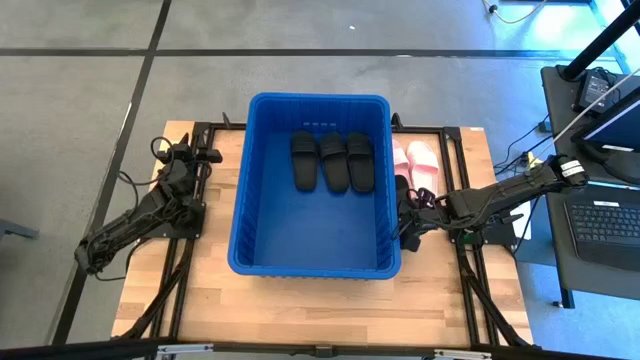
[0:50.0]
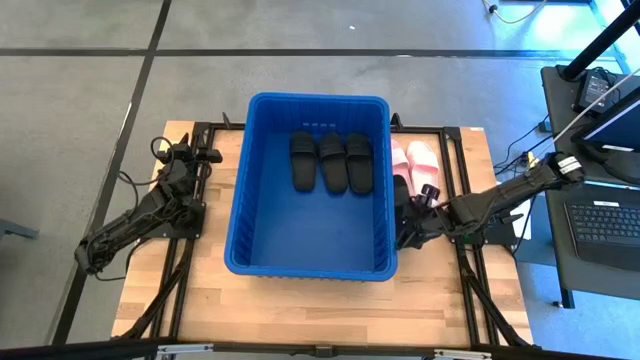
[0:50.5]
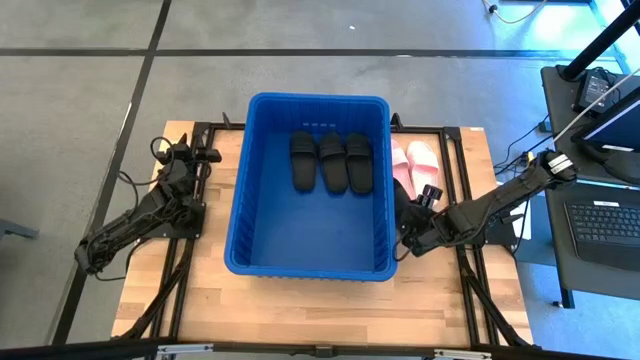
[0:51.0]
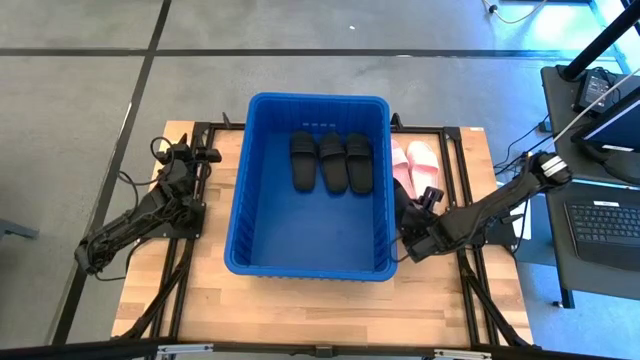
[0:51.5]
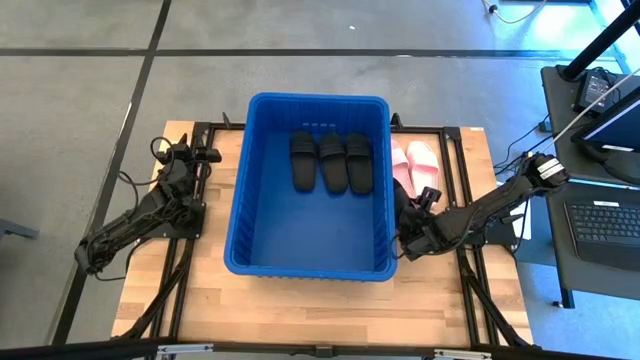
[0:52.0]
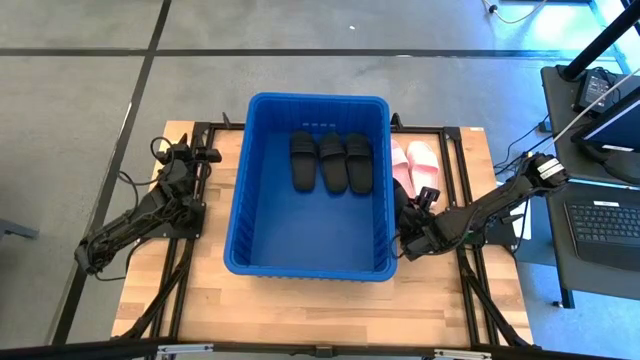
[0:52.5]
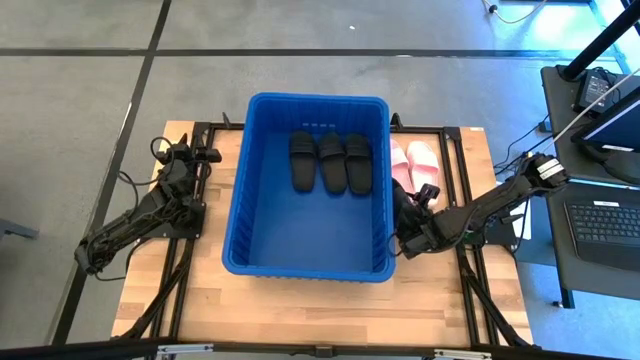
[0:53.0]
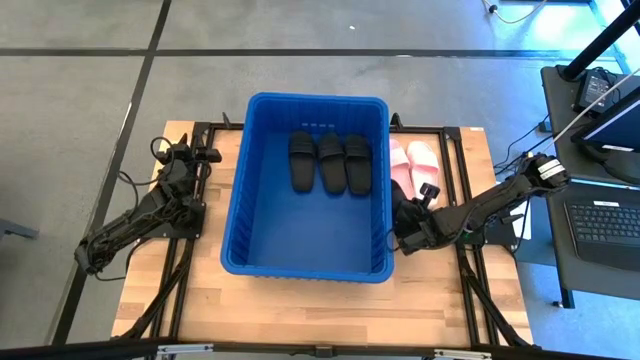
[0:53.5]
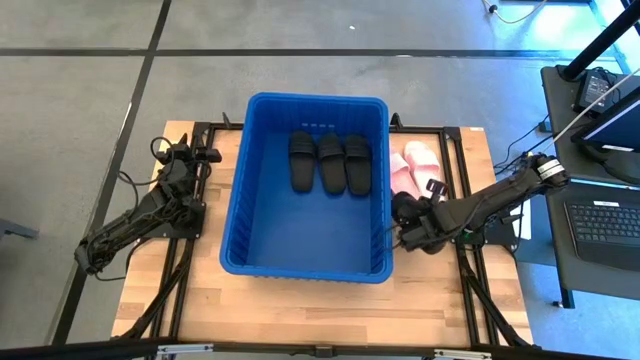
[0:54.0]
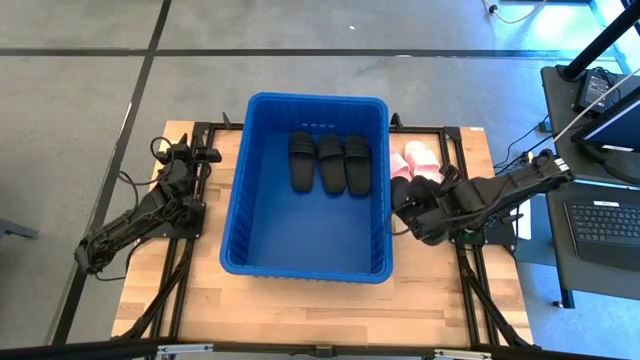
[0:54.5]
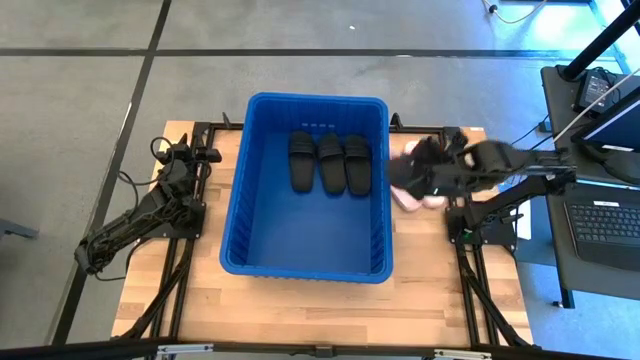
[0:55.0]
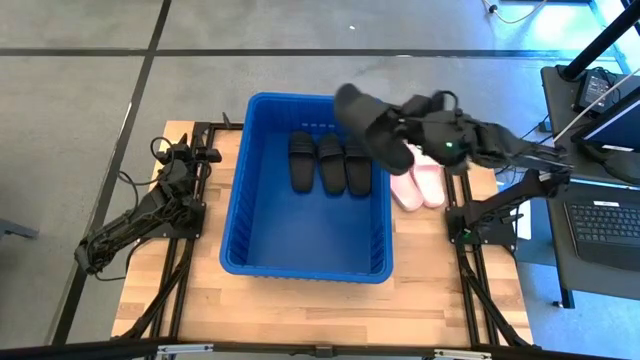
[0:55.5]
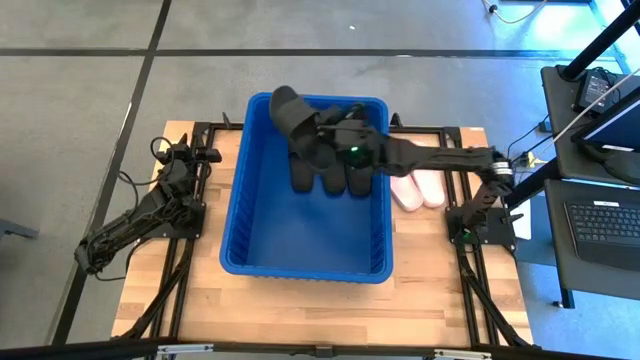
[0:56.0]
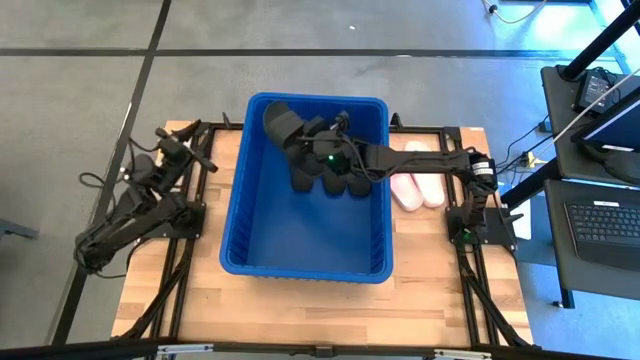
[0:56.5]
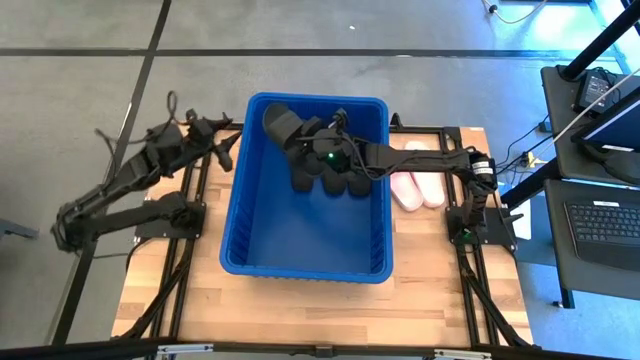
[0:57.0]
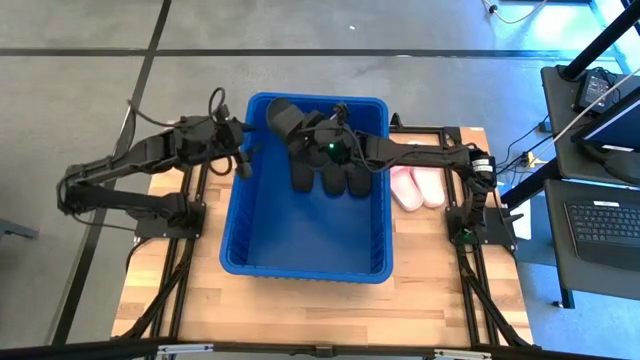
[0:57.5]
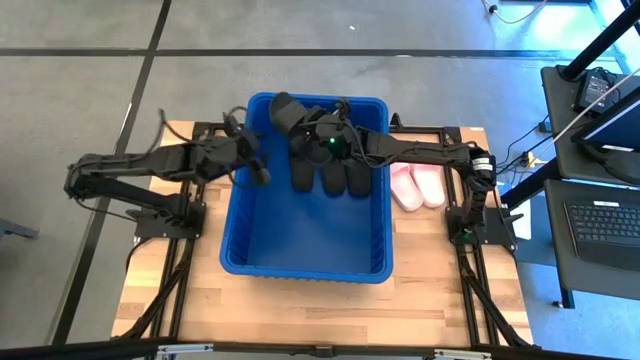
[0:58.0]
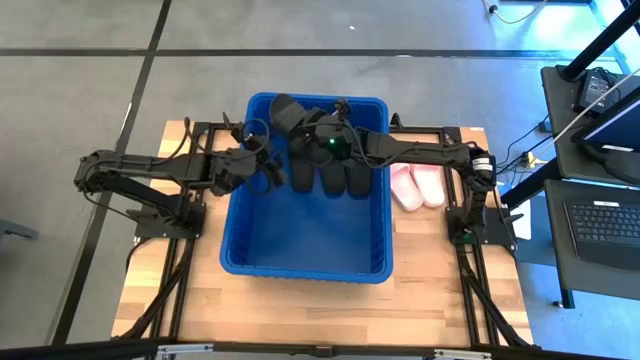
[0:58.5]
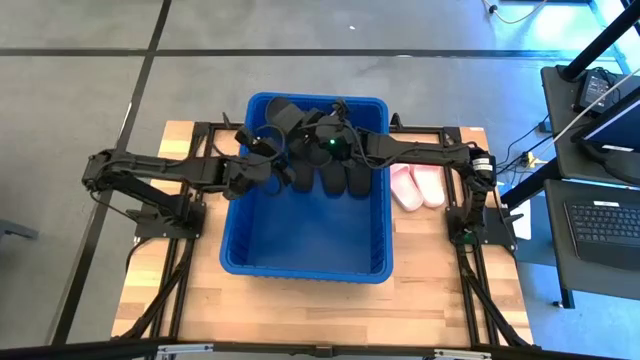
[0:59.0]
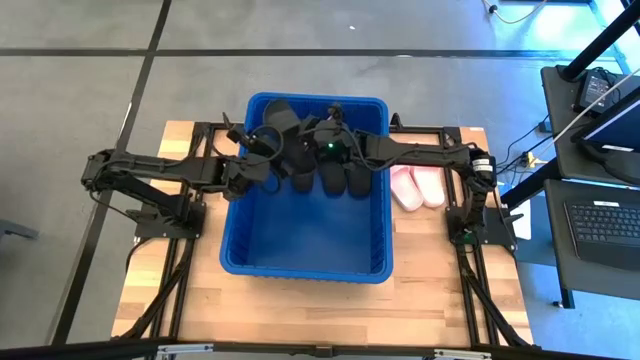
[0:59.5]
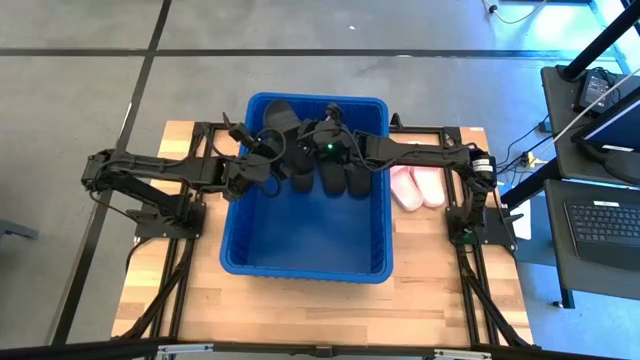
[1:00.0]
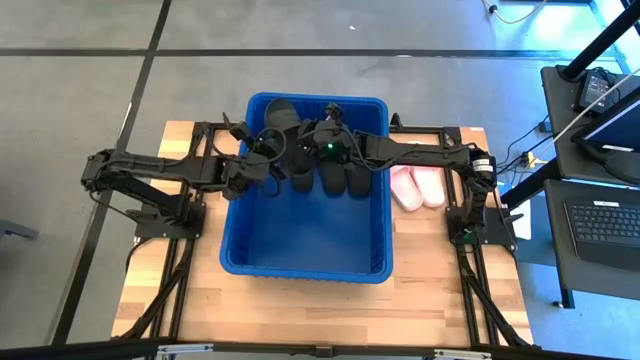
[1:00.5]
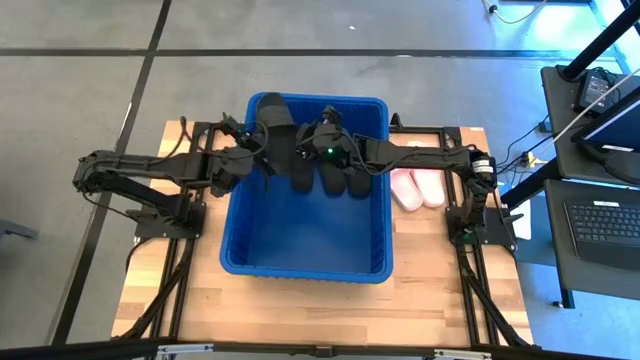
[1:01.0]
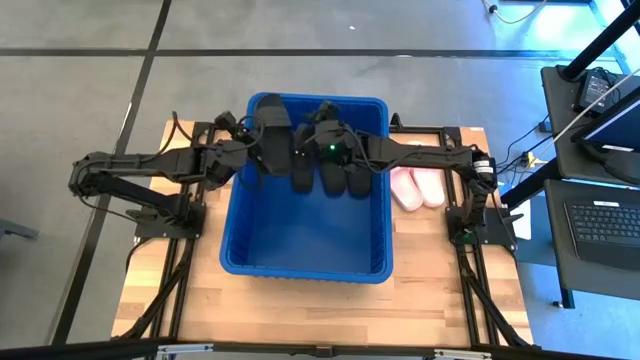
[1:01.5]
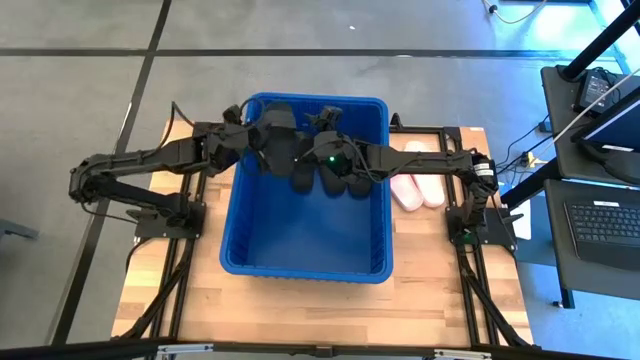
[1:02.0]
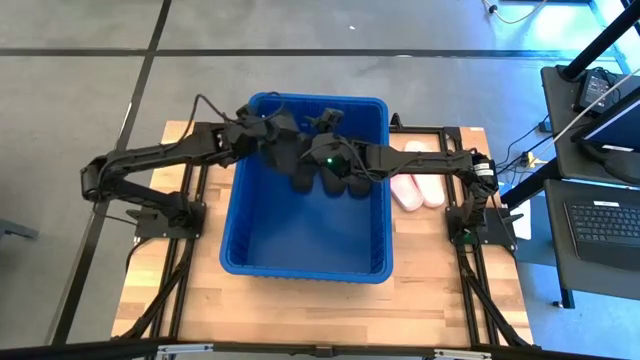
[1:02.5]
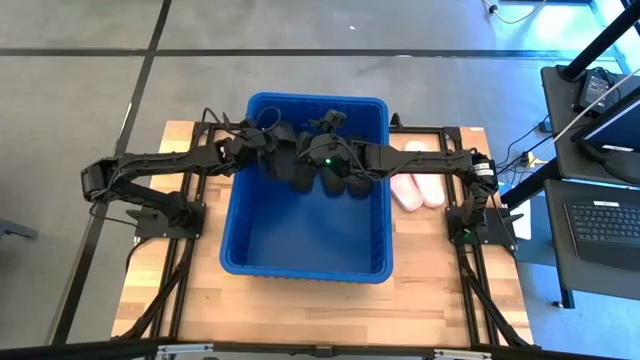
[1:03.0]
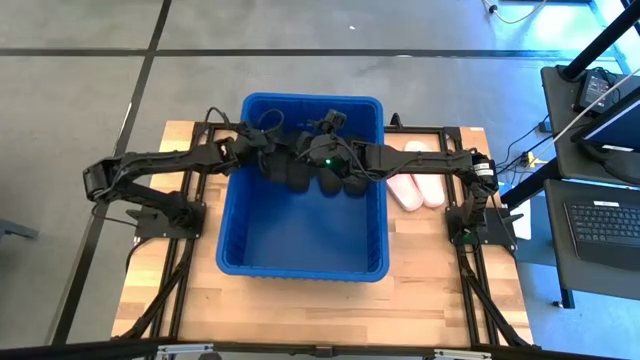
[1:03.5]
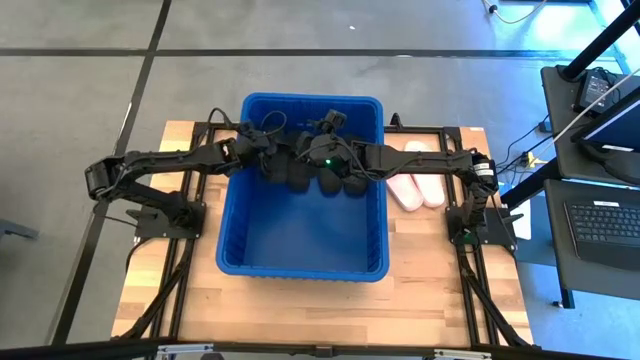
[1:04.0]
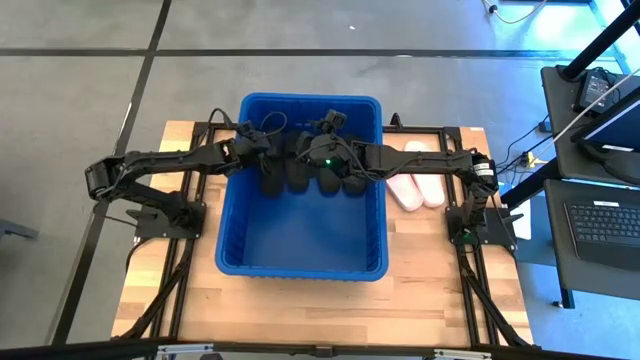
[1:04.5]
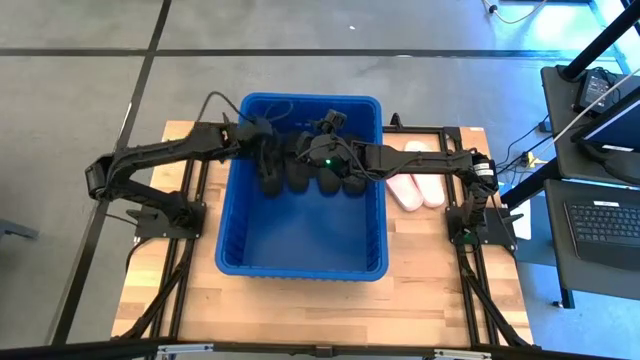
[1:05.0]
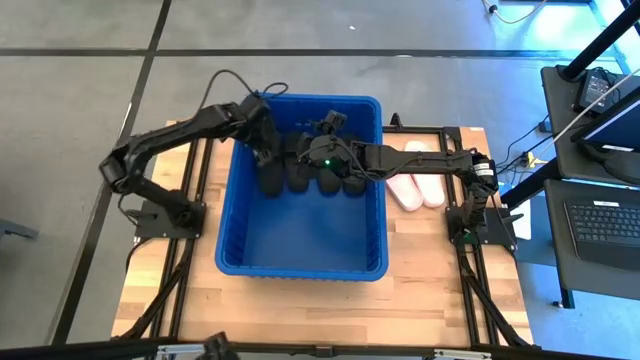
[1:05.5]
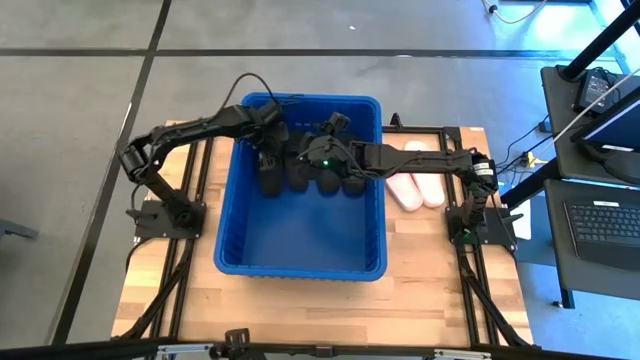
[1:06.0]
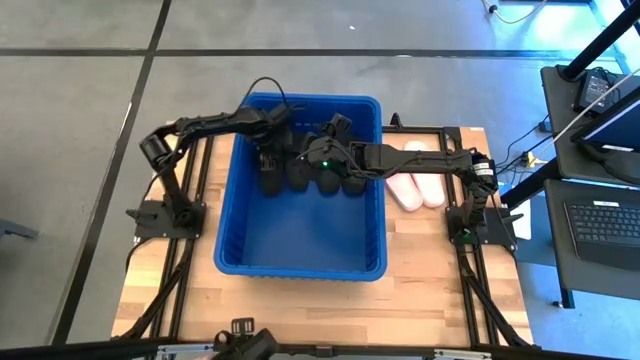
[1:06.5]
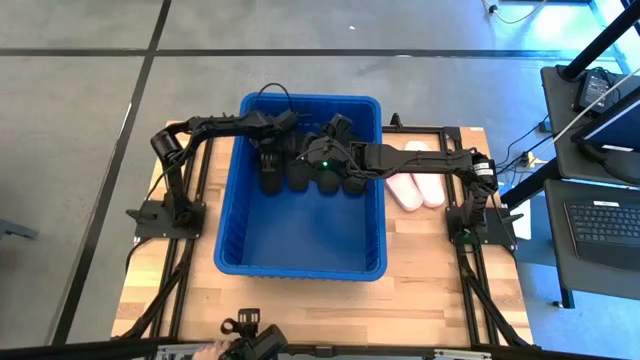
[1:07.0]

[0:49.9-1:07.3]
Task: Pick and place slides into bin
Put the black slipper into the blue bin

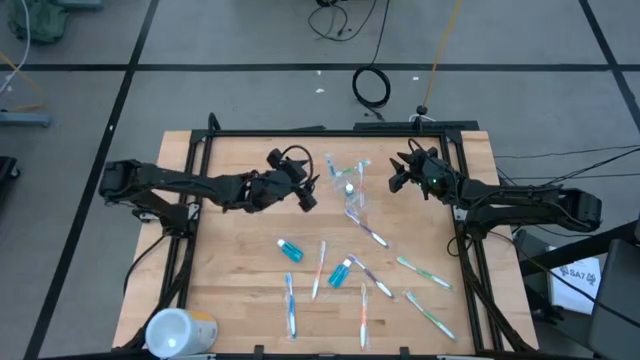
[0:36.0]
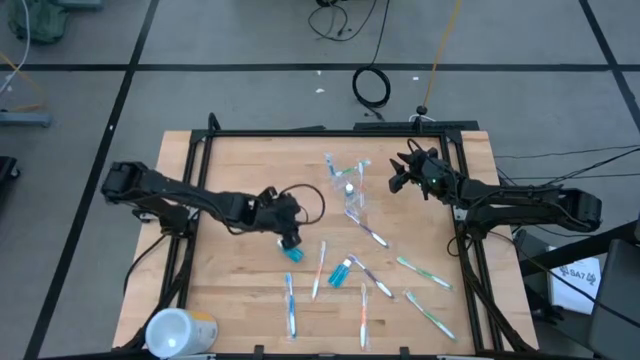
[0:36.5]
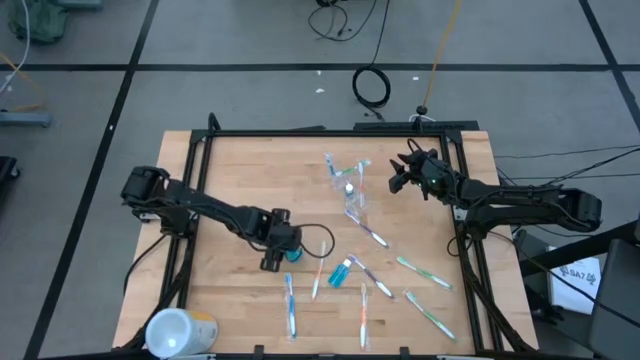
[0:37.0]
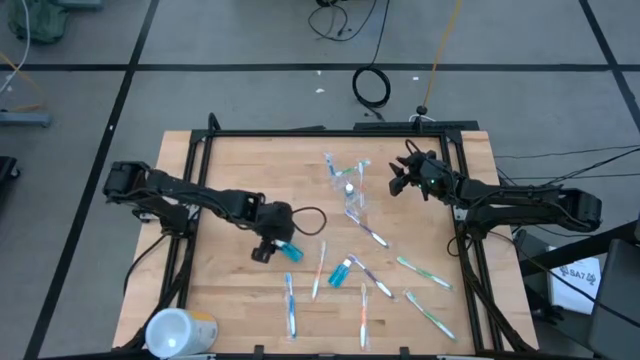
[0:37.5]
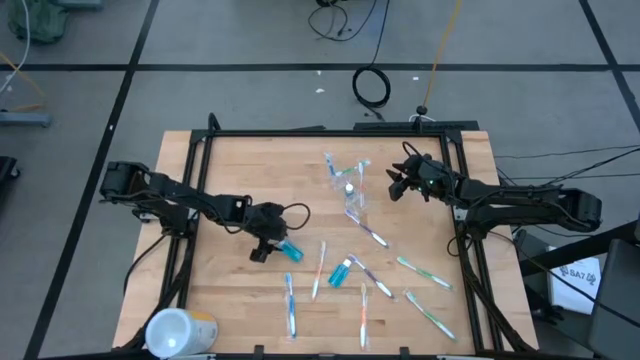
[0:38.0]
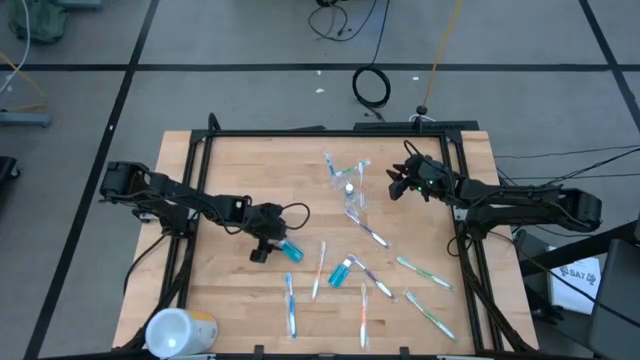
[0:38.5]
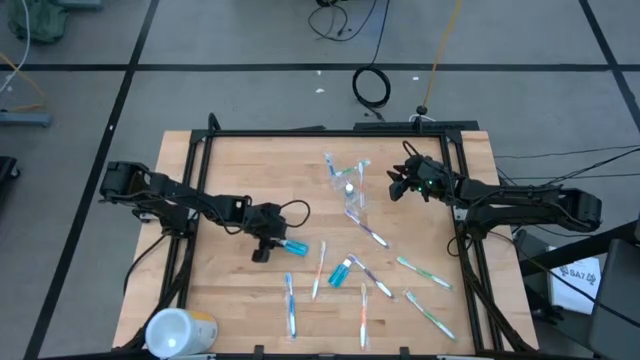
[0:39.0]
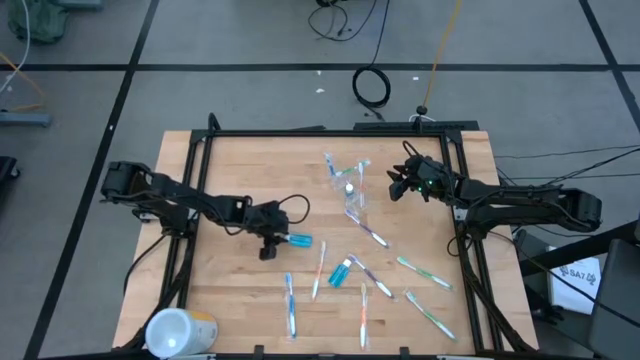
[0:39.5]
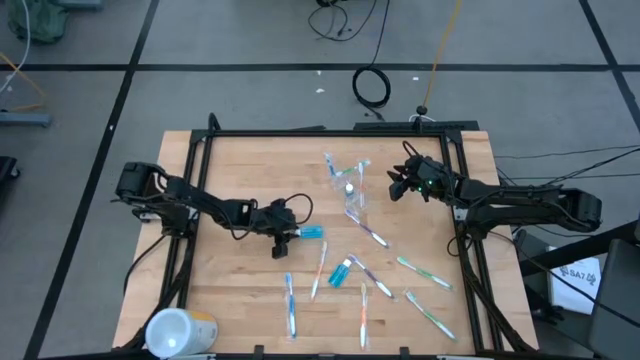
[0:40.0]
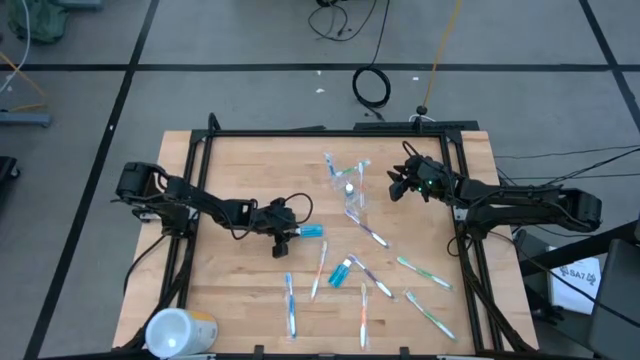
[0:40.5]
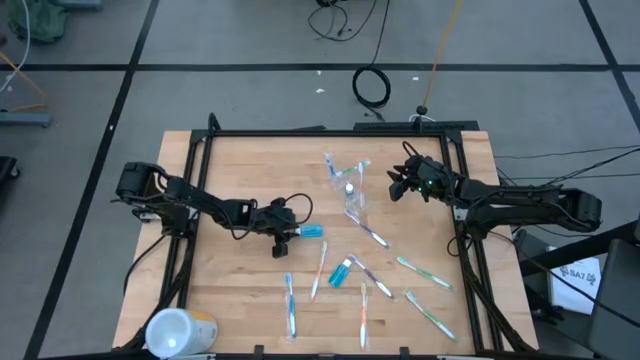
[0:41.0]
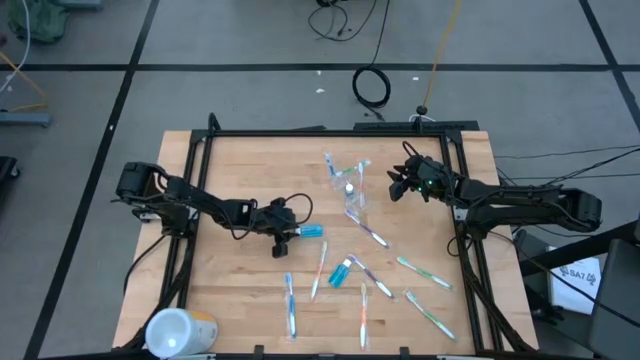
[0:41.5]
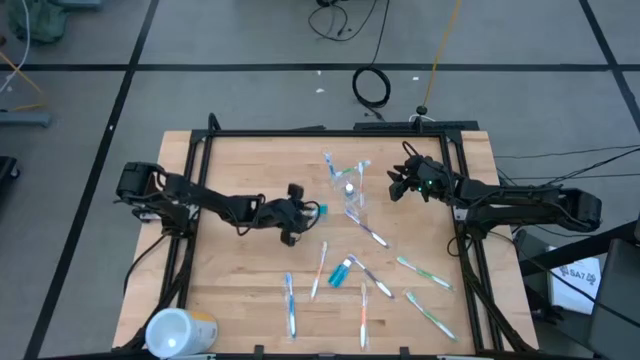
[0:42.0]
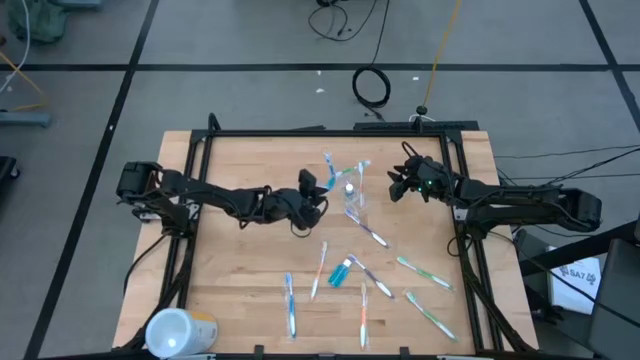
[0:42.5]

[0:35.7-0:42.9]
Task: Pick & Place toothbrushing station
Put the left blue mouthwash into the transparent organizer
